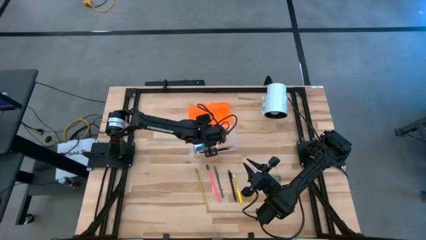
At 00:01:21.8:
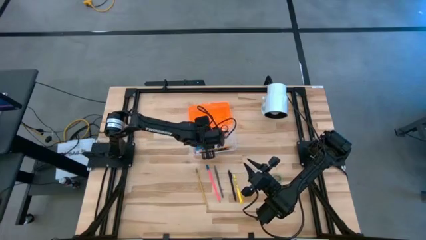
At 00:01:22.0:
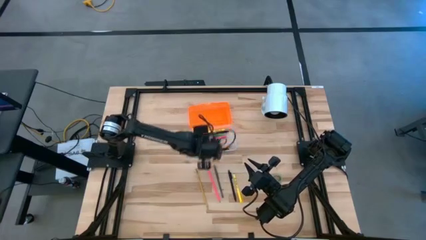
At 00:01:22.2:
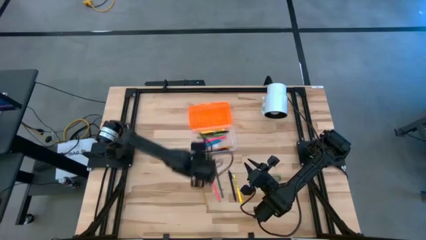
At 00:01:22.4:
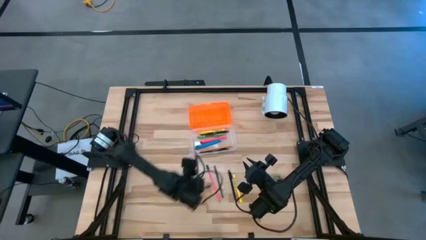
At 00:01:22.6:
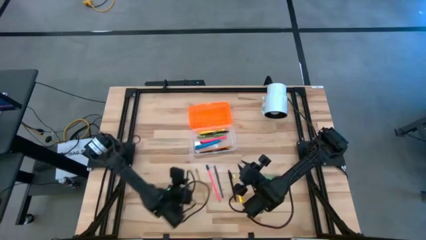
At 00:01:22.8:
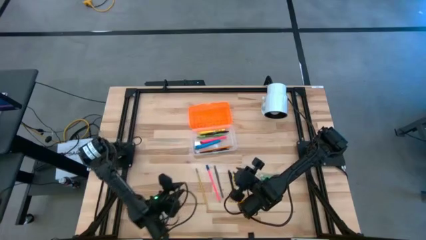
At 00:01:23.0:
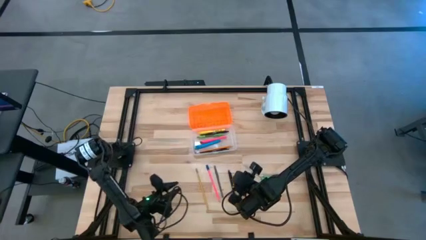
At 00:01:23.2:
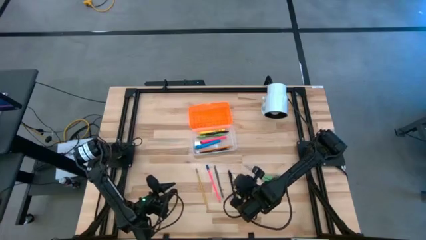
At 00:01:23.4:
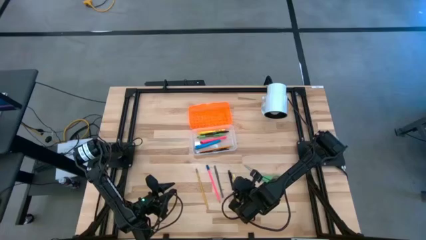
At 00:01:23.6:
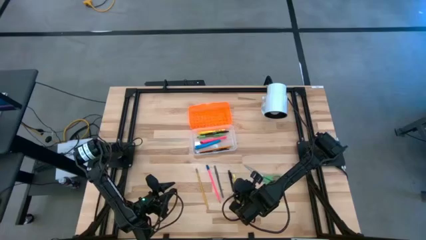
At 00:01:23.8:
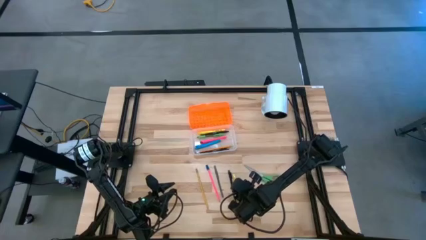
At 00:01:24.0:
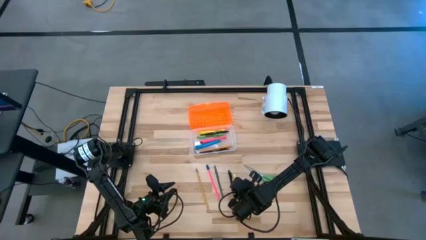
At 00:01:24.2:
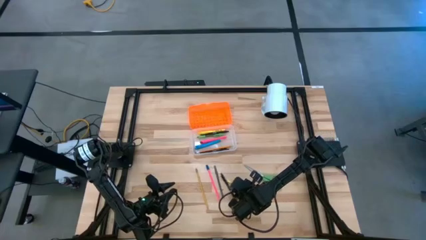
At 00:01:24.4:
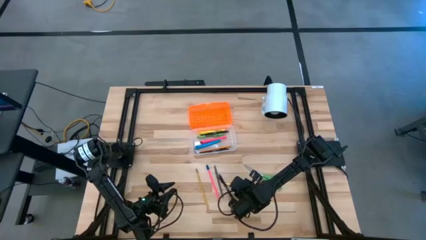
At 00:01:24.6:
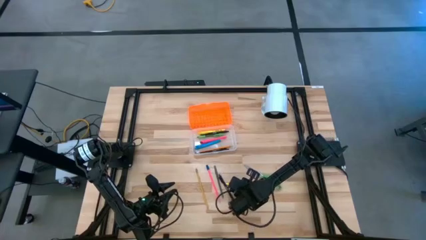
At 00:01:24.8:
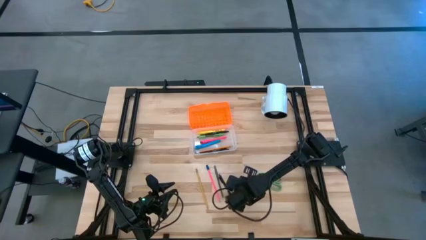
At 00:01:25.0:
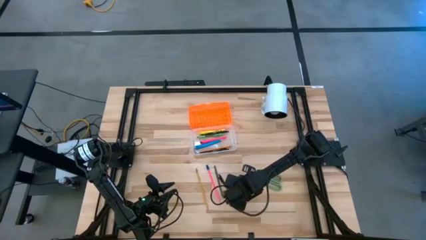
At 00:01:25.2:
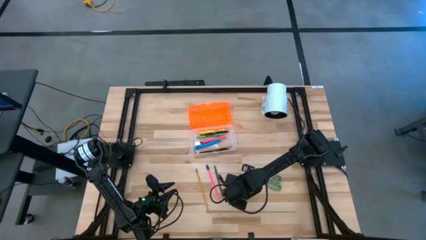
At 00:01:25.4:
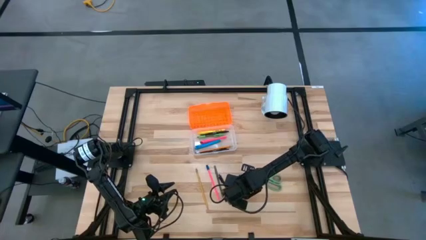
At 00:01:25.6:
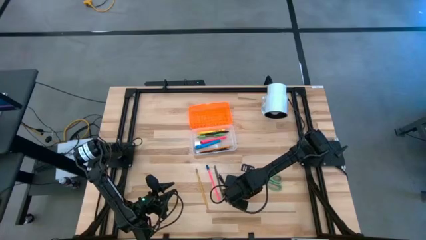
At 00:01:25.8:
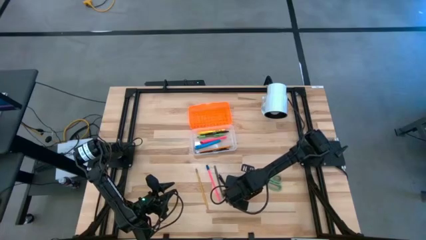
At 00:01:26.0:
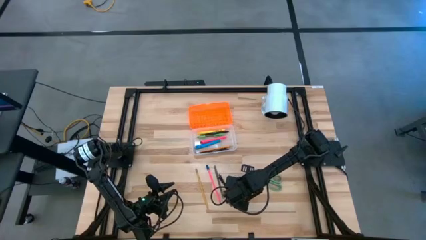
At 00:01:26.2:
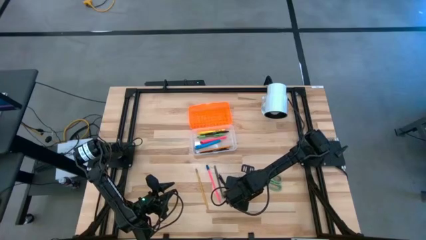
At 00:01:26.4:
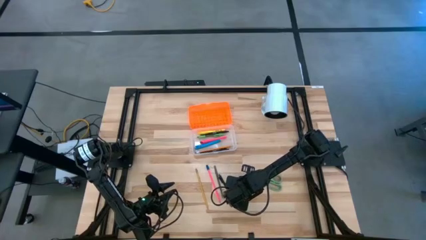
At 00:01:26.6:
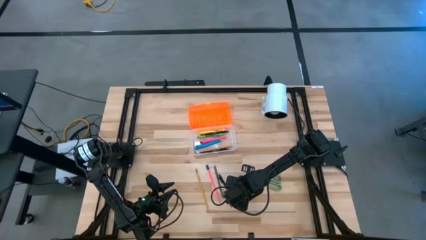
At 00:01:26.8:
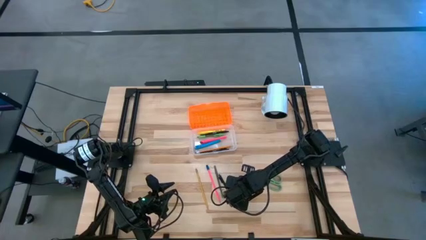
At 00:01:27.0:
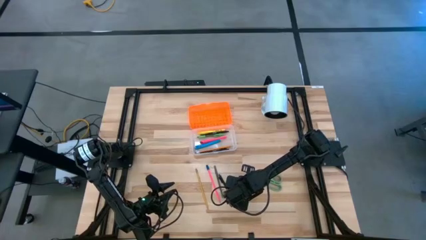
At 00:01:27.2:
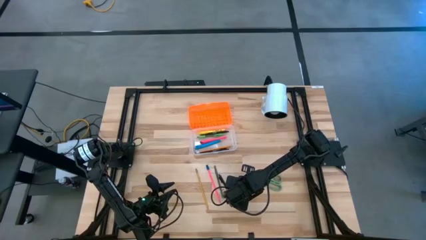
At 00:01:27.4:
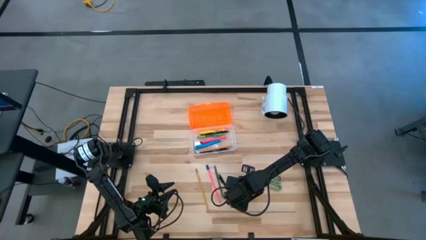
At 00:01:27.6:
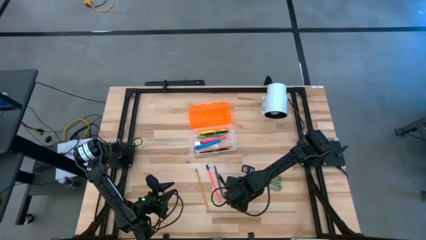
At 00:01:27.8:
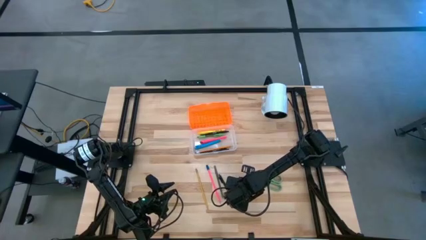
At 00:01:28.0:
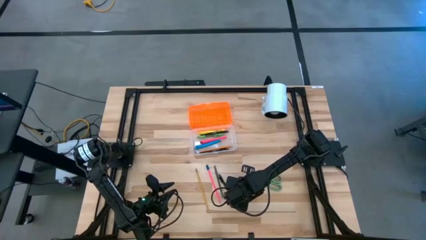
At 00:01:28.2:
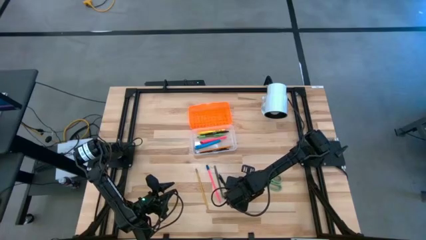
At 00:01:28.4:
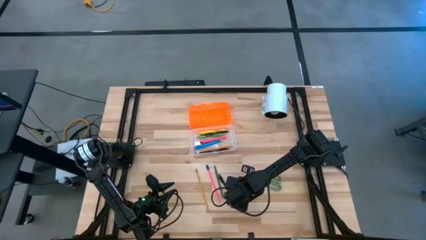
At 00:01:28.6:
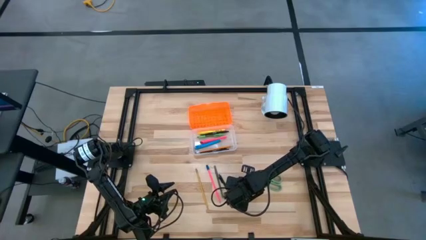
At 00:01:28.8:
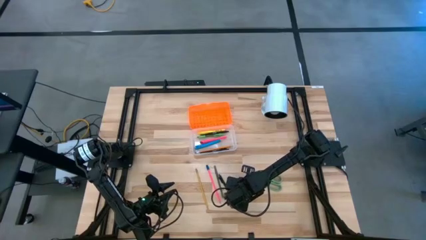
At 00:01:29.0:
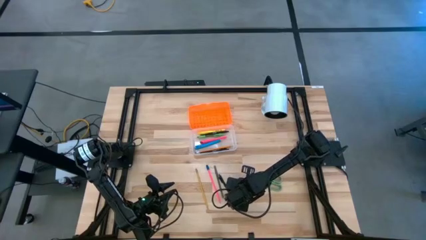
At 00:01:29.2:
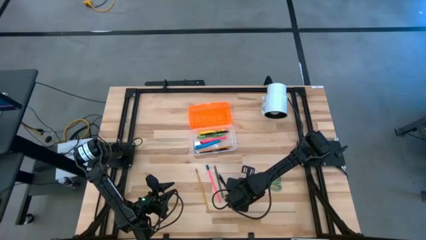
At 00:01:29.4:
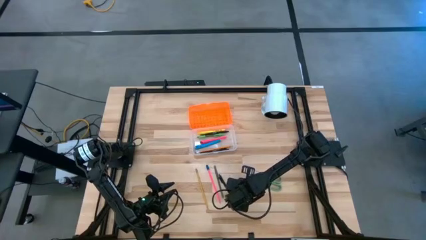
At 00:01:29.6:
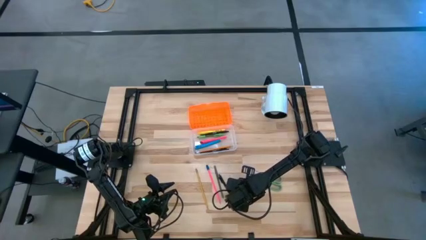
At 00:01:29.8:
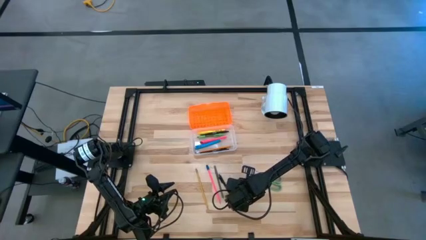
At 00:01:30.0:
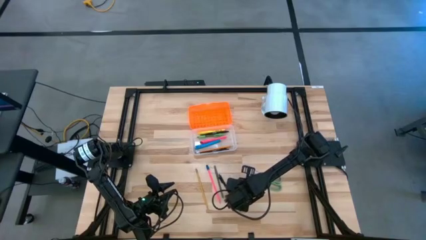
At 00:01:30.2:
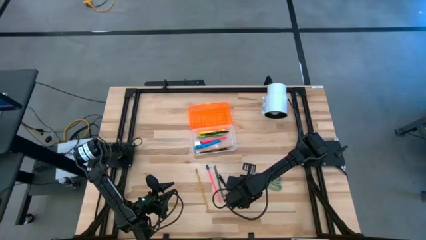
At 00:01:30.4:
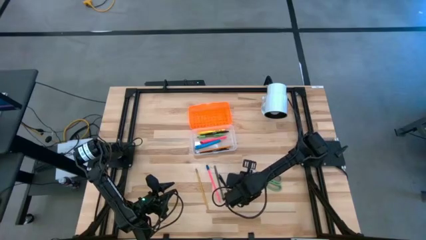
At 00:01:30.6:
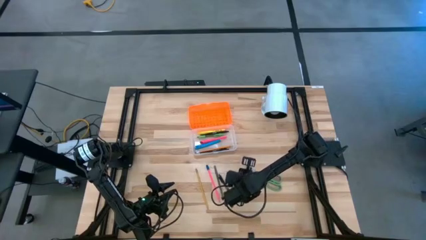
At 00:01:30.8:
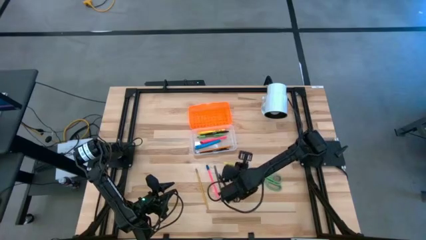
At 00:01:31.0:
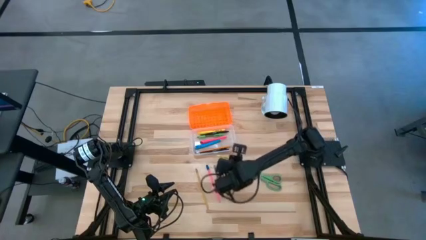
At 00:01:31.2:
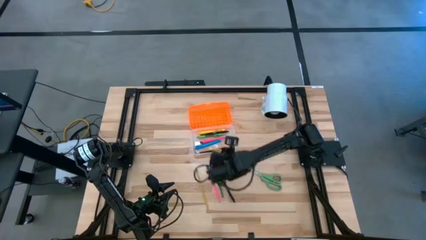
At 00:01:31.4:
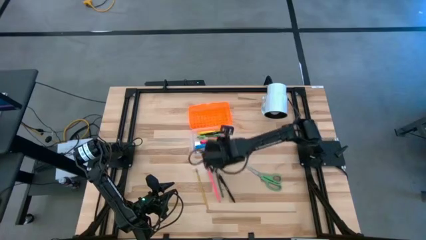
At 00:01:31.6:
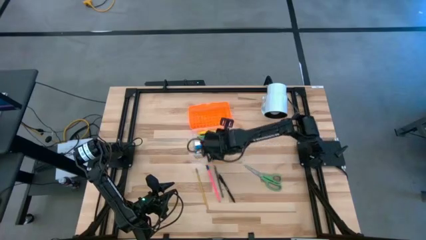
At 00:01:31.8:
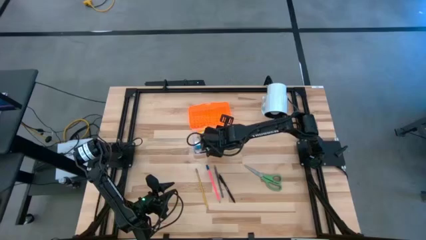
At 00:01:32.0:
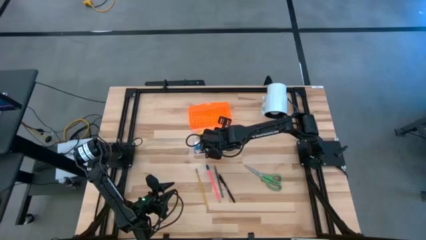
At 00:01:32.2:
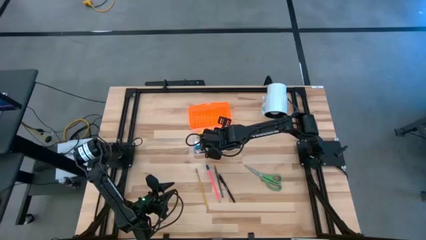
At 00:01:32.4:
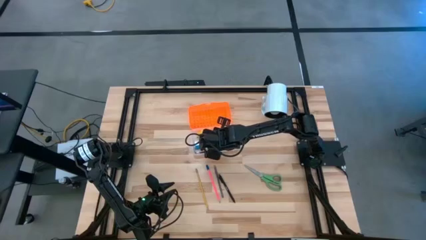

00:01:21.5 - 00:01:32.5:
Task: Pick & place school supplies into a supply box
Put the yellow pen into the supply box

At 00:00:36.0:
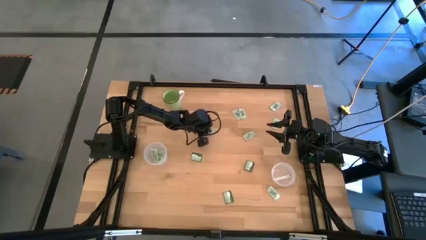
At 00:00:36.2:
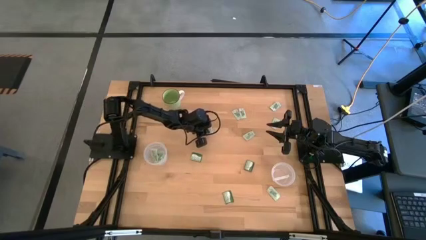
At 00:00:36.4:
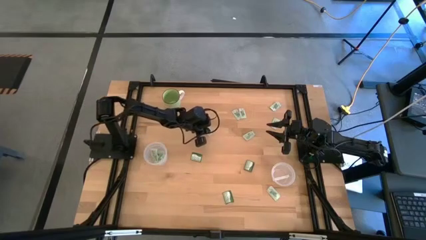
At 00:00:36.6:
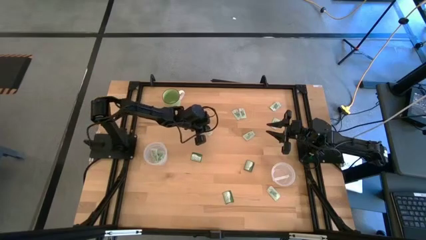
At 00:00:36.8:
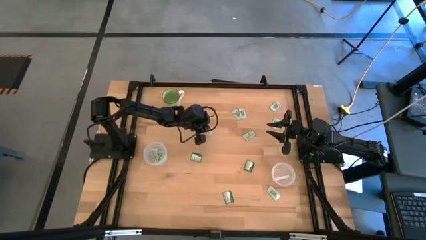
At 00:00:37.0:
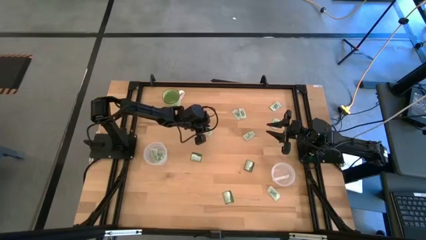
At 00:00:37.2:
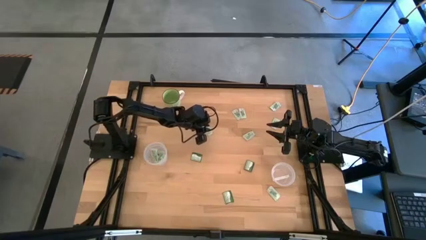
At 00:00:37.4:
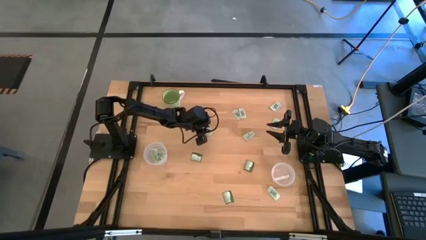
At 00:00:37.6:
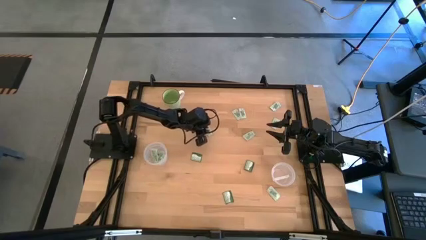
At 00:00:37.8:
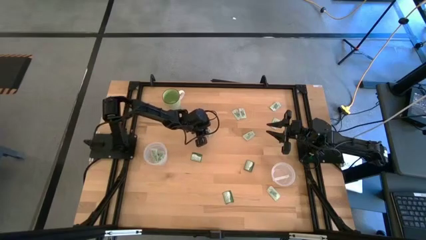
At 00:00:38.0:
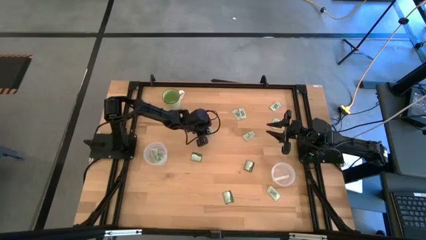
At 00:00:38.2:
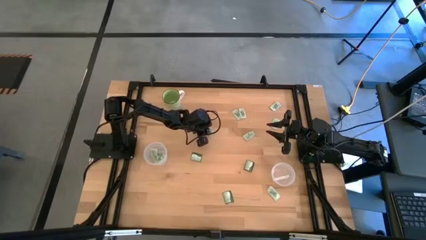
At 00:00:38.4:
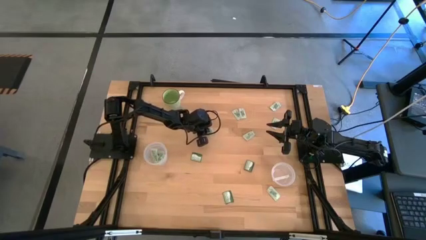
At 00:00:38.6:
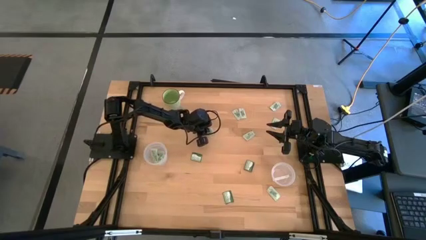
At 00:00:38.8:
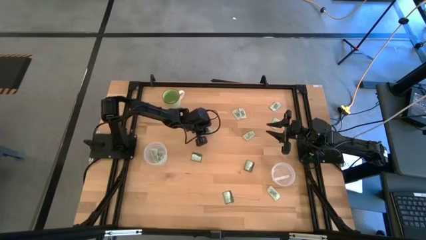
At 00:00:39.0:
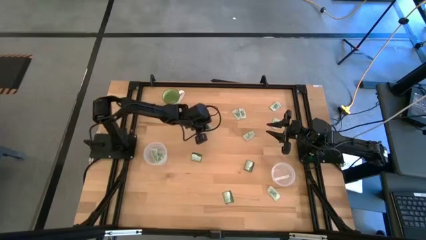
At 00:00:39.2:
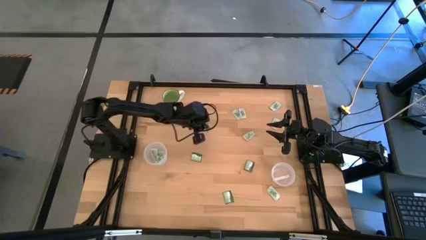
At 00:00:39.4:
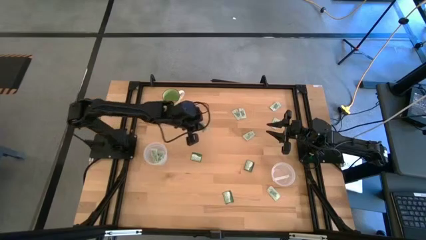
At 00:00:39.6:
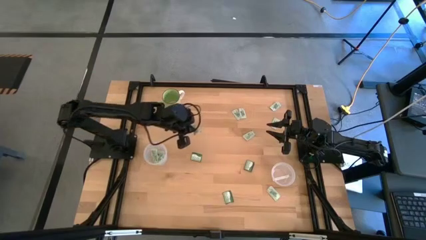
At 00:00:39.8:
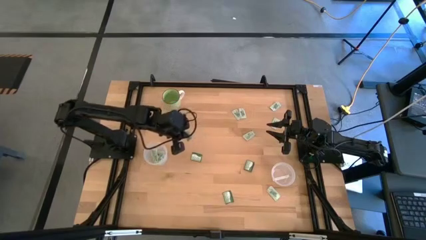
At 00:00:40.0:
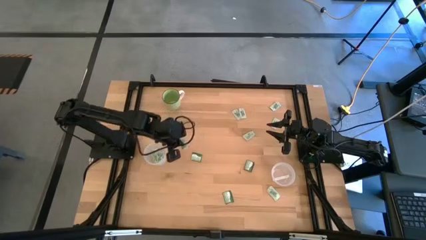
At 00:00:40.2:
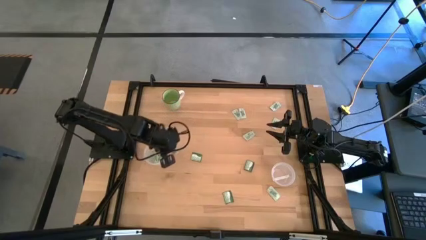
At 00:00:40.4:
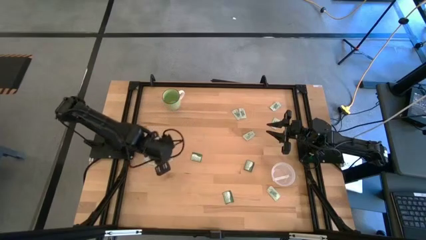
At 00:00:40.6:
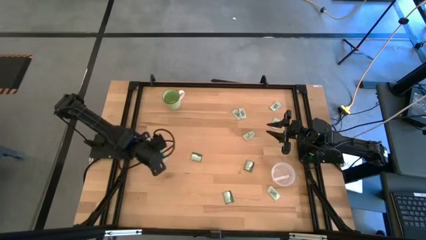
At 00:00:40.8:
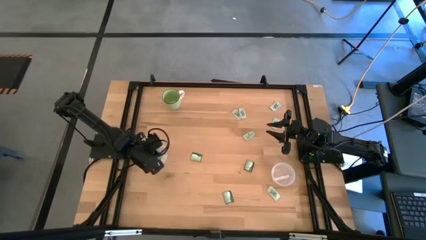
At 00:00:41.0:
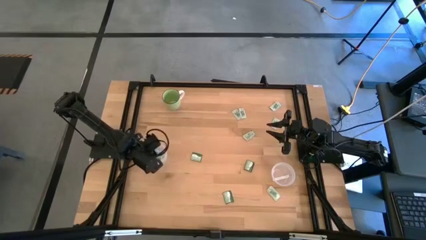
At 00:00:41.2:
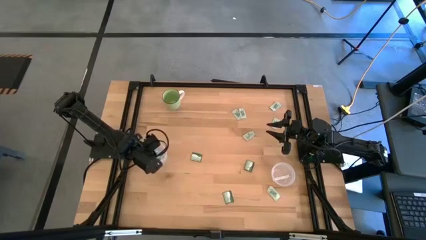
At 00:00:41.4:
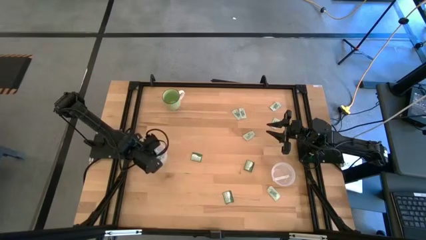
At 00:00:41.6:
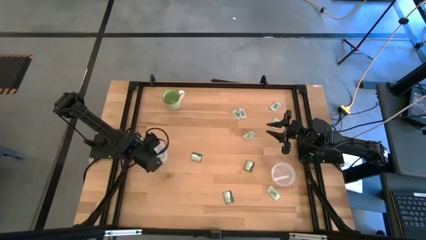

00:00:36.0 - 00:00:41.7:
Task: Pick and place items into bin
Put the stevia packet into the left transparent bin
